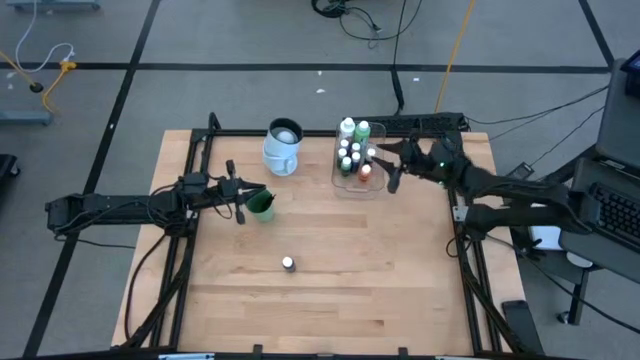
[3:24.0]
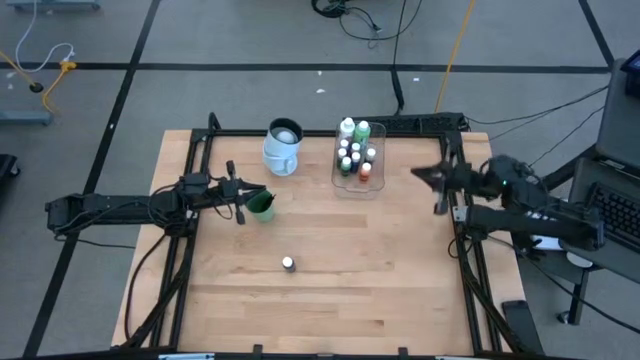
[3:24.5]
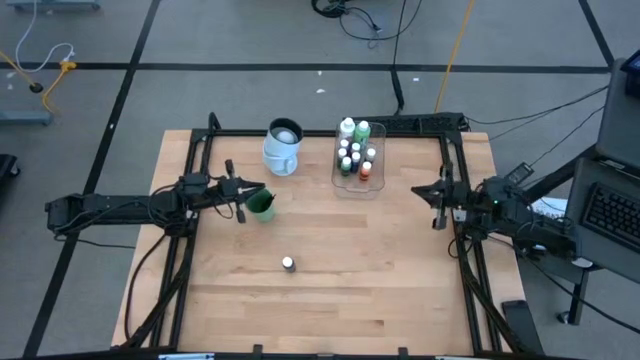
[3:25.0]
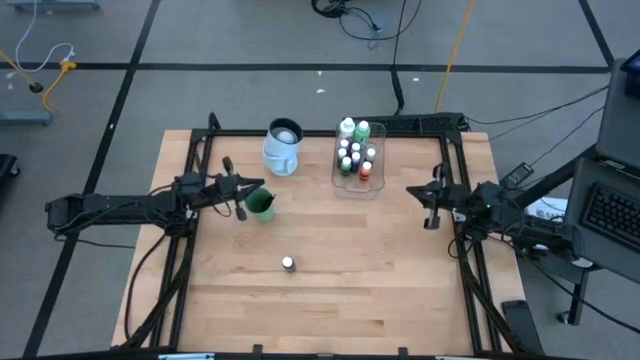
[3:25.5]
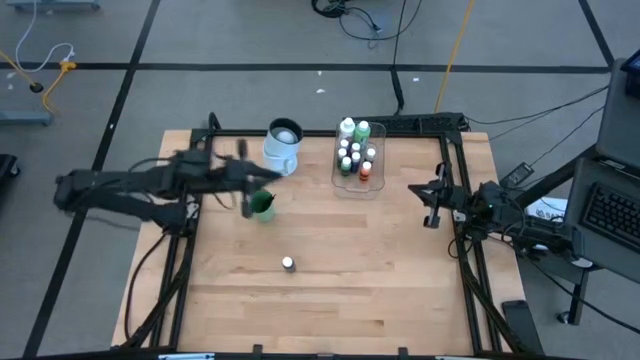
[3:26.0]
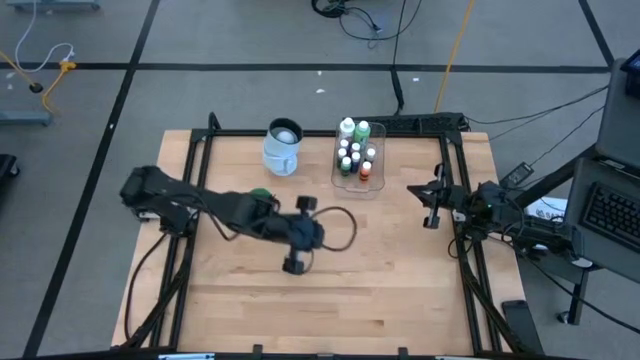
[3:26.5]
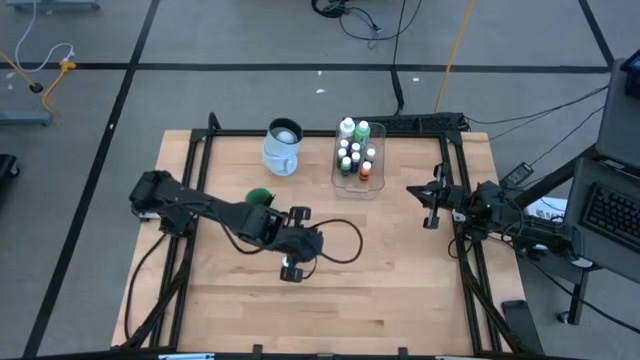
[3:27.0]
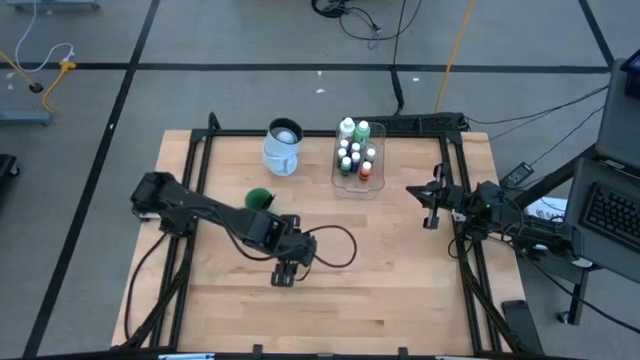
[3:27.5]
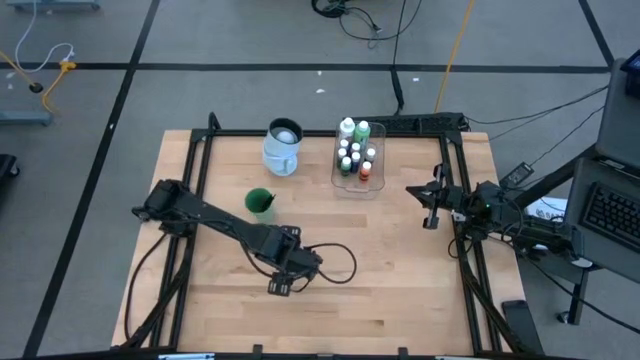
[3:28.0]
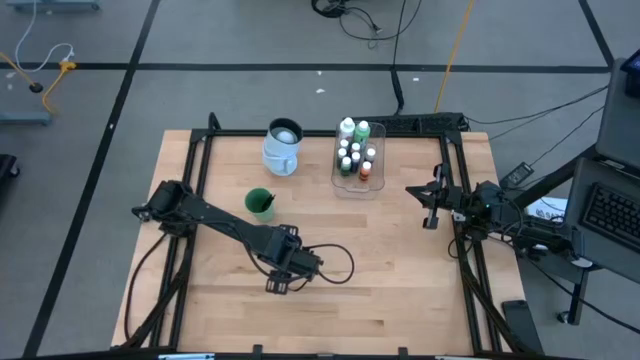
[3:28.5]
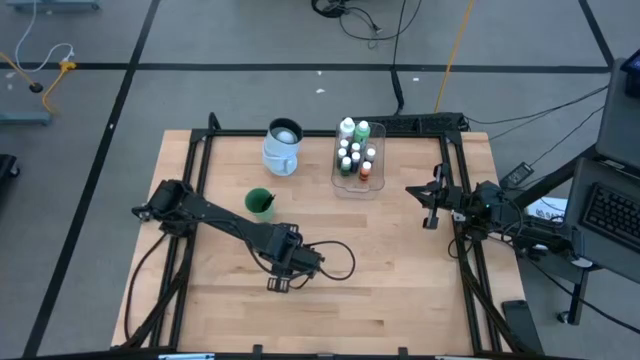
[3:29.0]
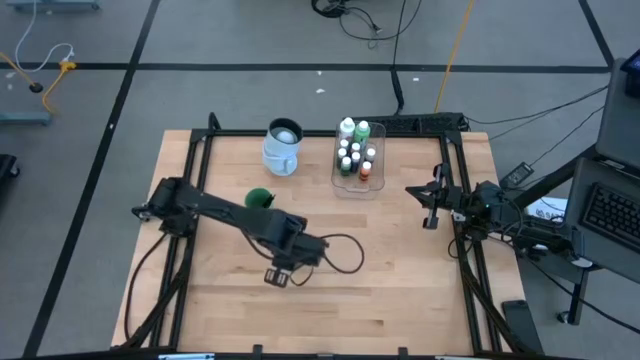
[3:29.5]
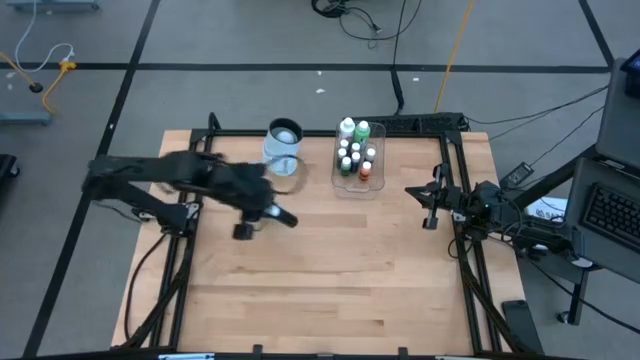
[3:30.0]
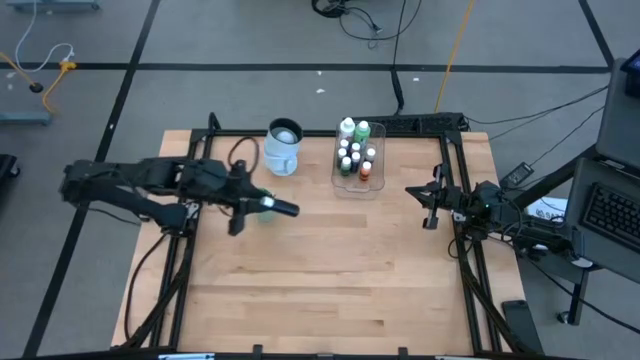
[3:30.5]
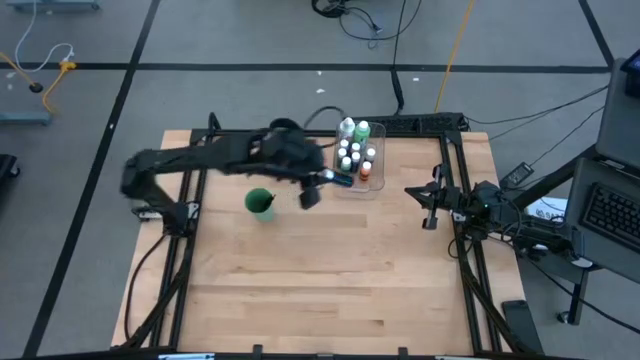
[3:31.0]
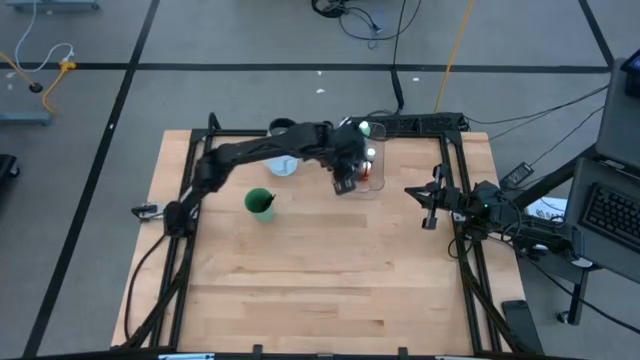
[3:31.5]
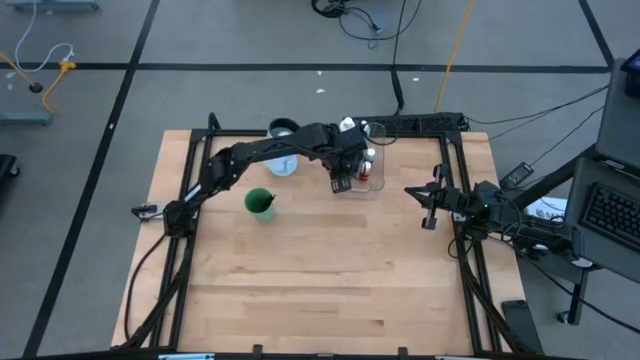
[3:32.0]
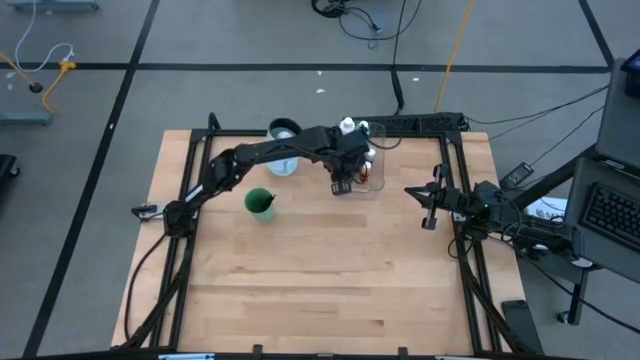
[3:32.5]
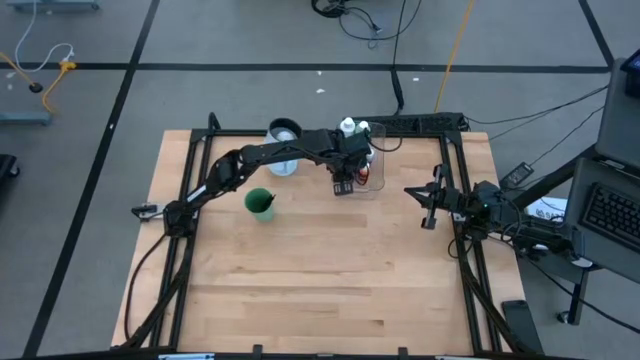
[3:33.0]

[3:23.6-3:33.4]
Task: Pick & Place Paint Supplies
Put the black paint bottle into the transparent bin

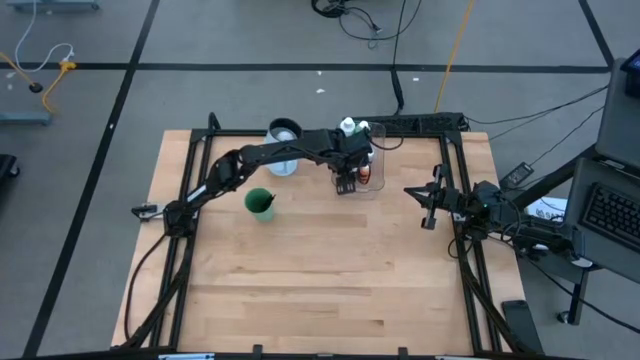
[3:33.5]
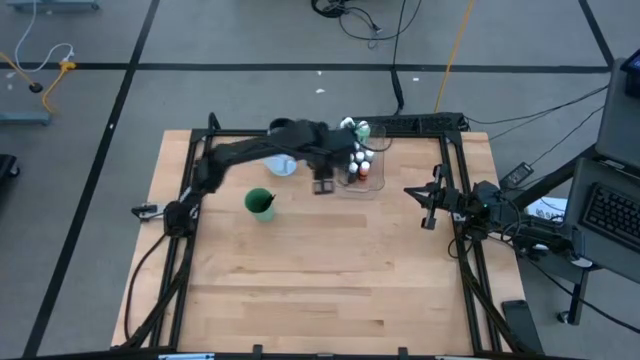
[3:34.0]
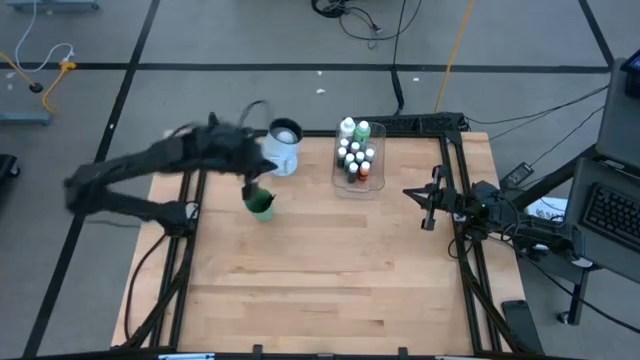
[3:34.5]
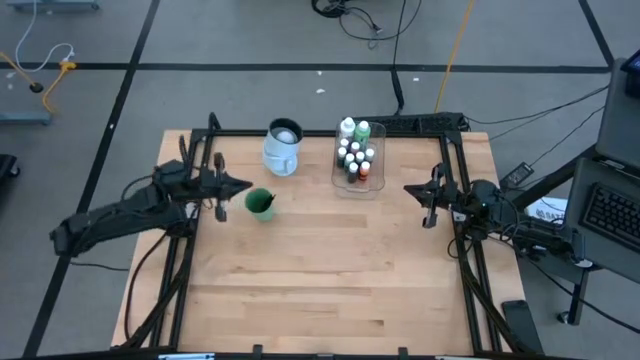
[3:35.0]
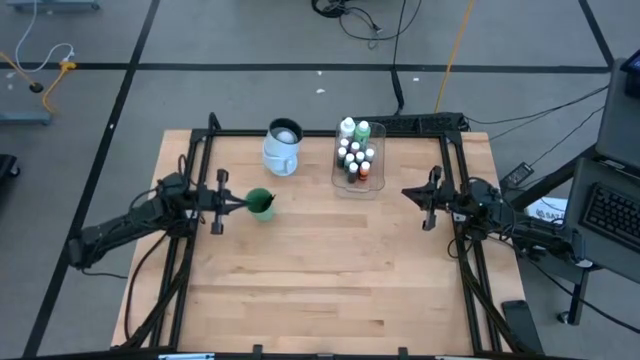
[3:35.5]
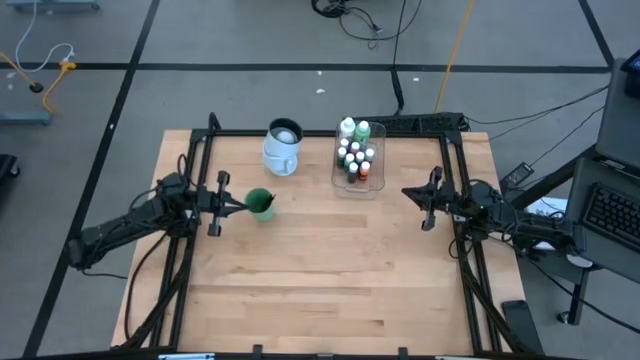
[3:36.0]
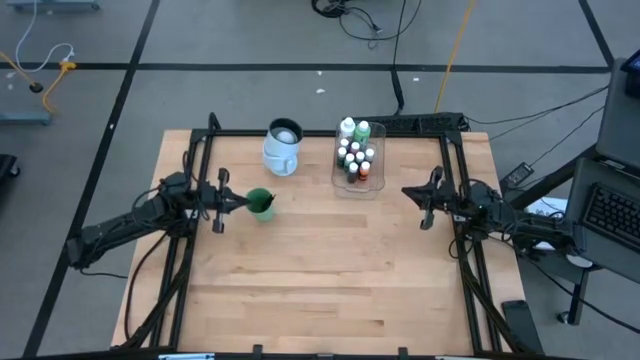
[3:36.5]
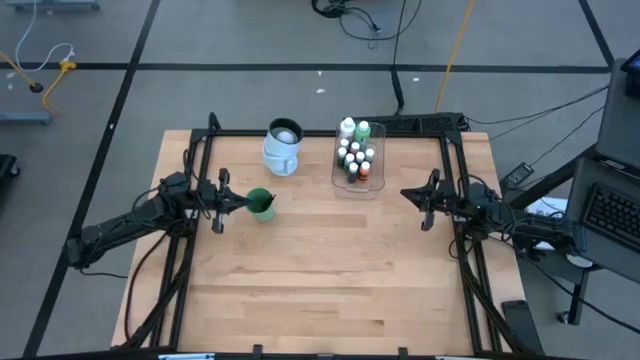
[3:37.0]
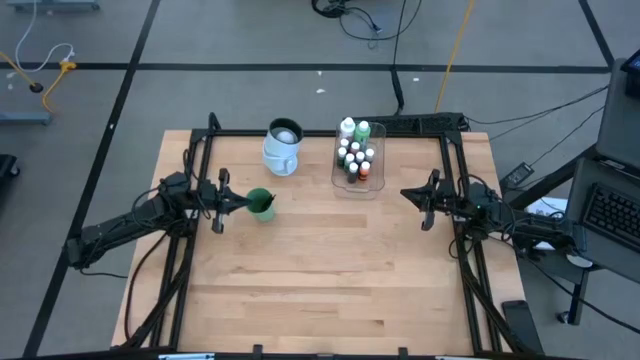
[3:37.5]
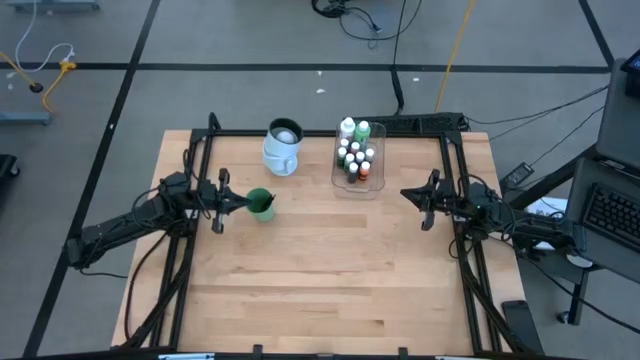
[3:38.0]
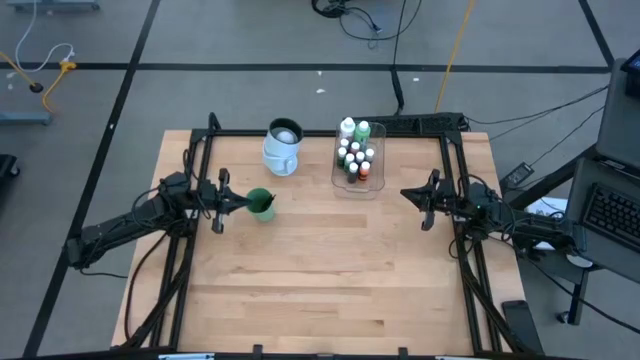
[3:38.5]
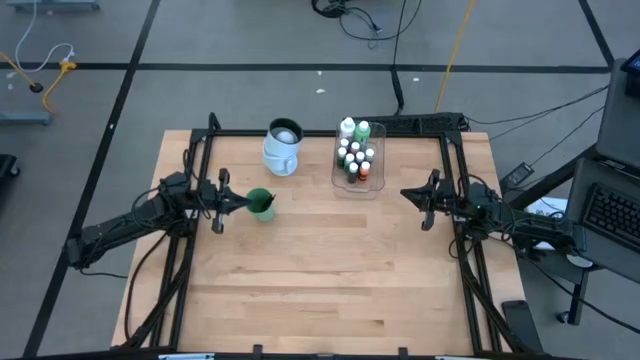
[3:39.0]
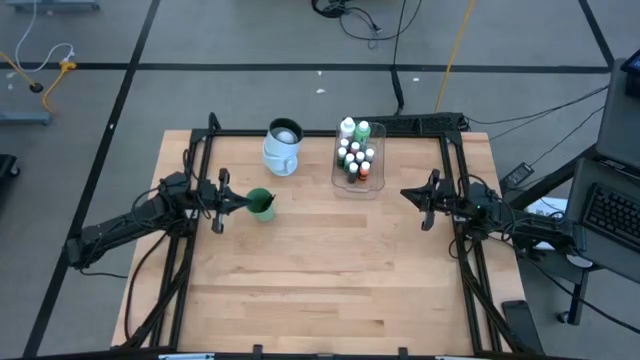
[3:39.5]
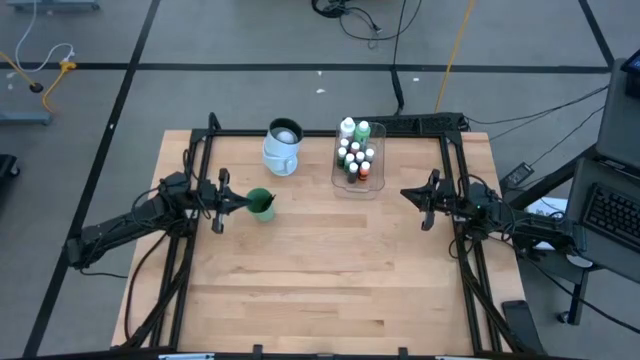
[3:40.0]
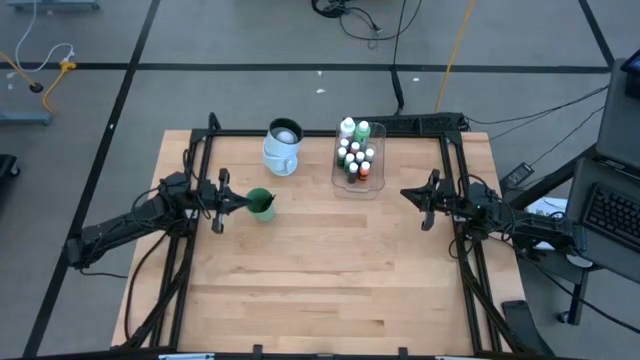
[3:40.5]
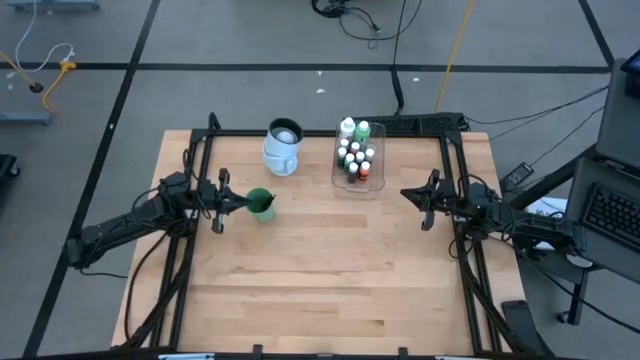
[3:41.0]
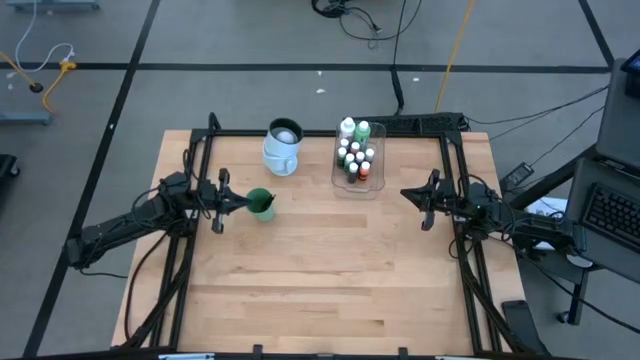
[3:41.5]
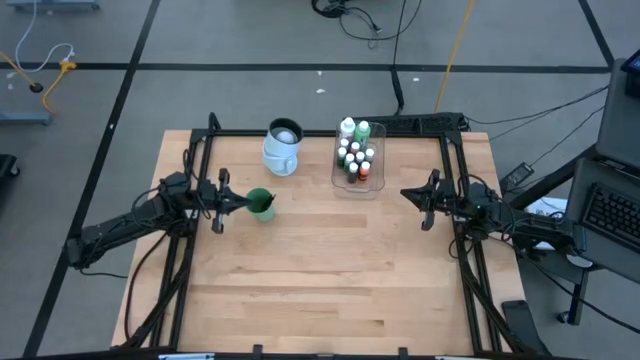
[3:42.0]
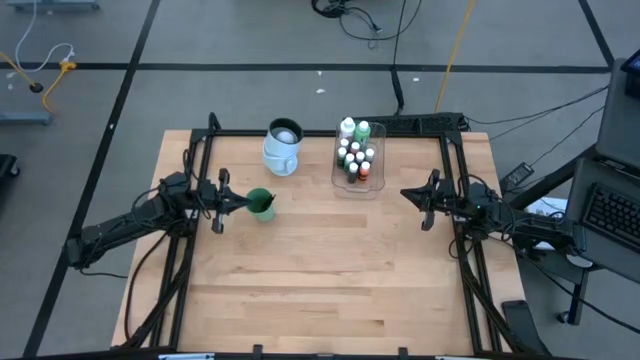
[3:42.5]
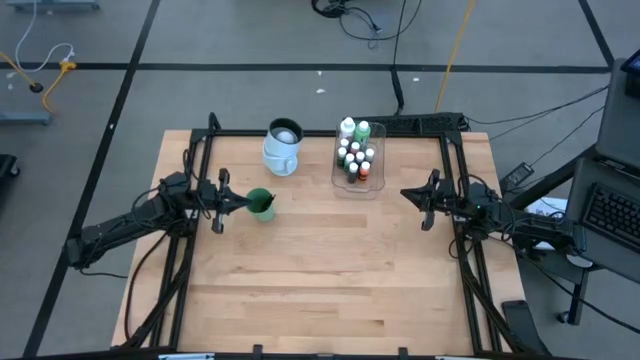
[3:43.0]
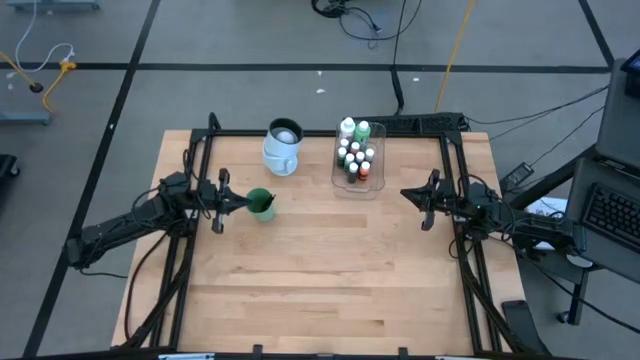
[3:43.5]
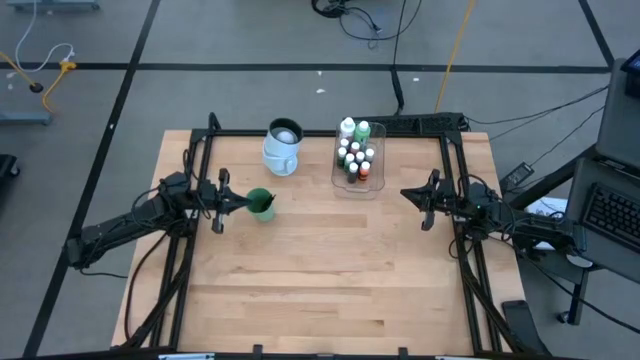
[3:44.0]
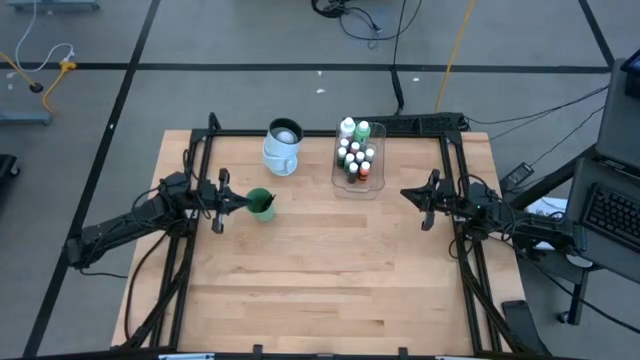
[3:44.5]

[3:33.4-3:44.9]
Return to Home Position
